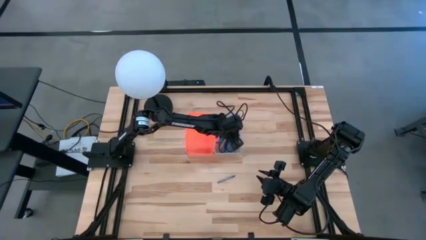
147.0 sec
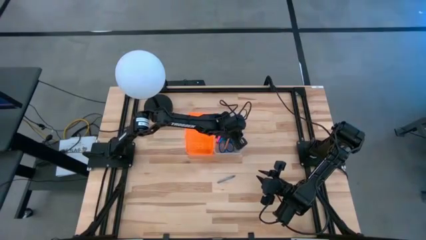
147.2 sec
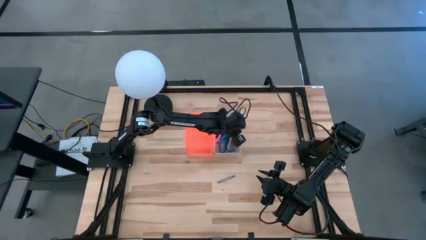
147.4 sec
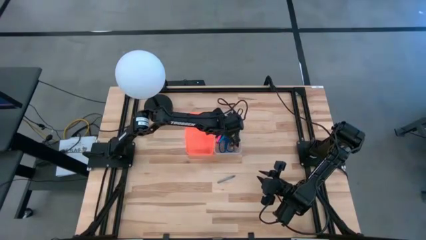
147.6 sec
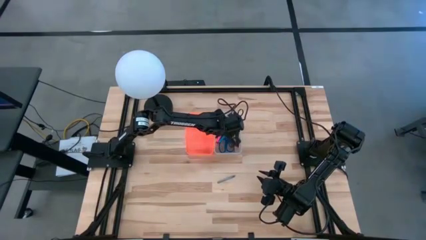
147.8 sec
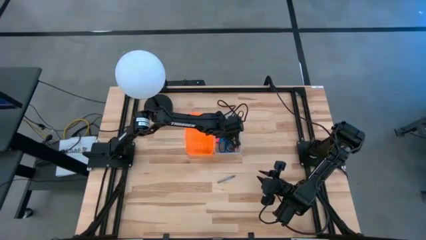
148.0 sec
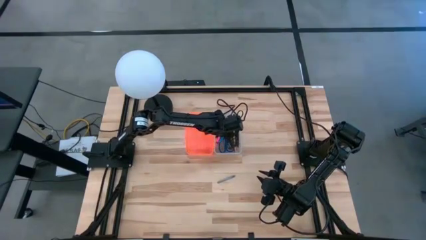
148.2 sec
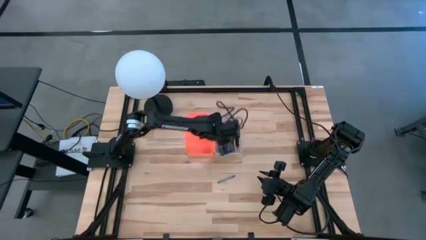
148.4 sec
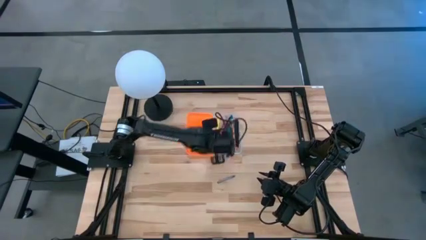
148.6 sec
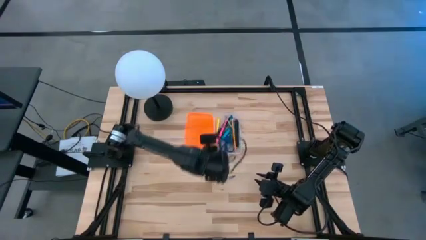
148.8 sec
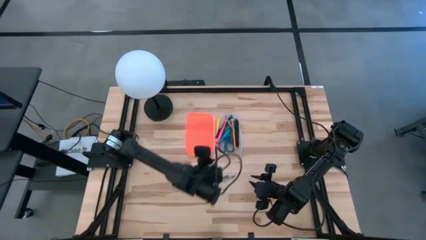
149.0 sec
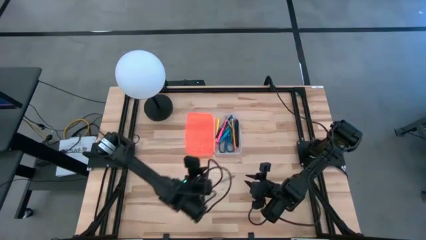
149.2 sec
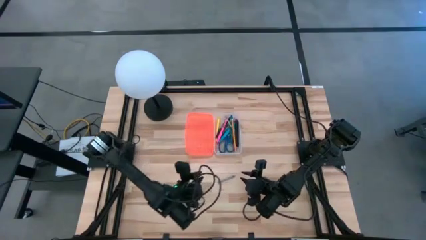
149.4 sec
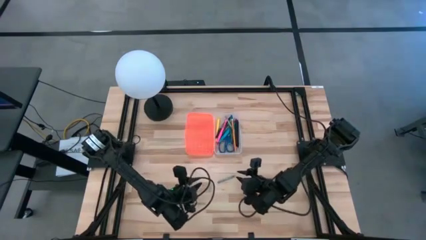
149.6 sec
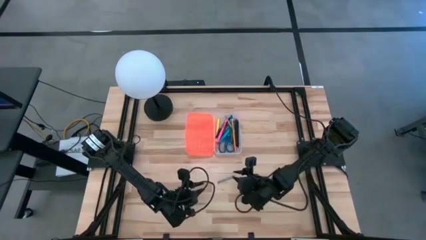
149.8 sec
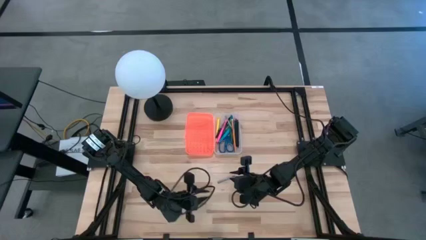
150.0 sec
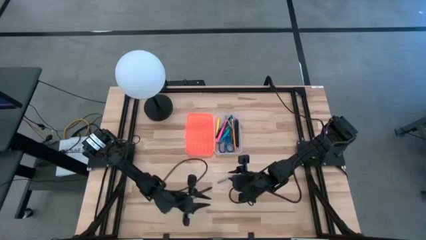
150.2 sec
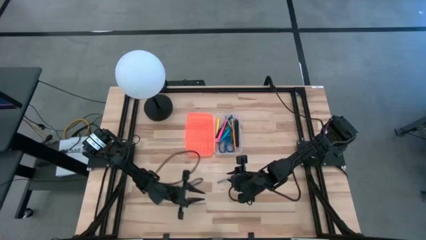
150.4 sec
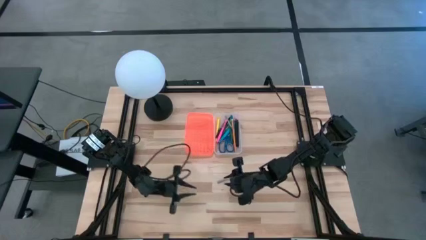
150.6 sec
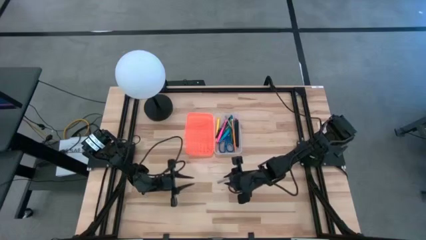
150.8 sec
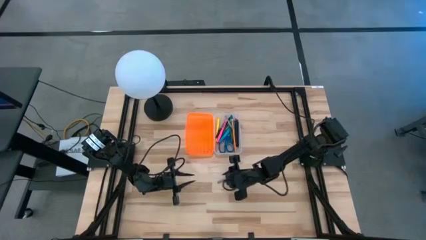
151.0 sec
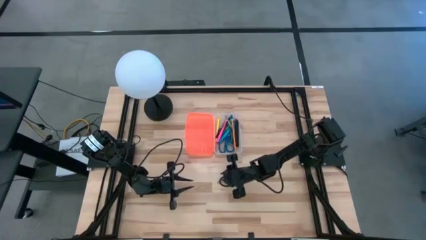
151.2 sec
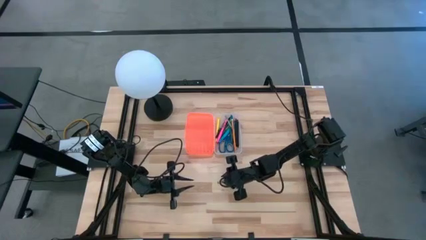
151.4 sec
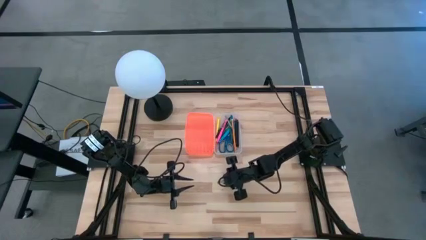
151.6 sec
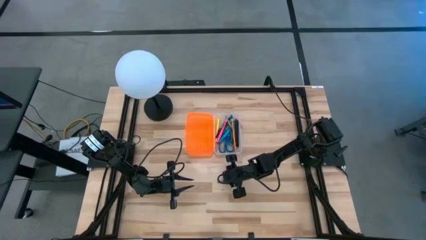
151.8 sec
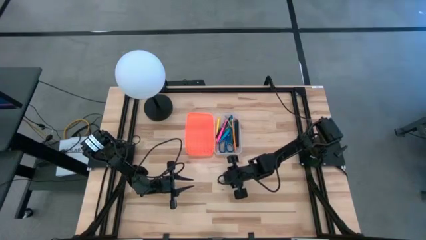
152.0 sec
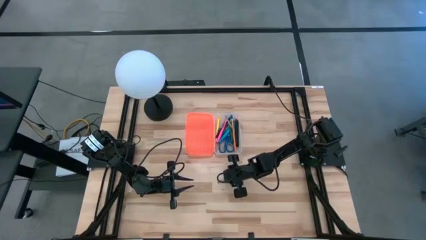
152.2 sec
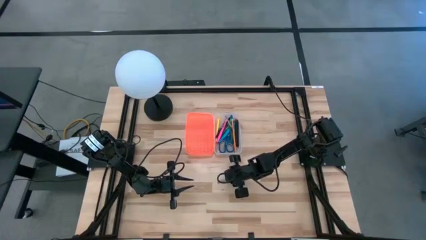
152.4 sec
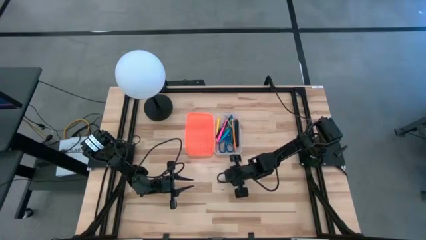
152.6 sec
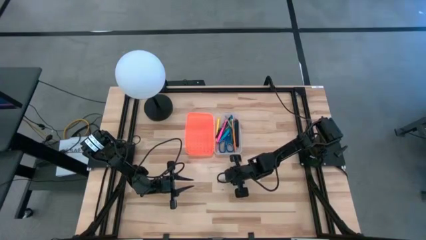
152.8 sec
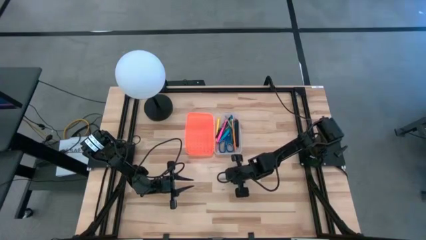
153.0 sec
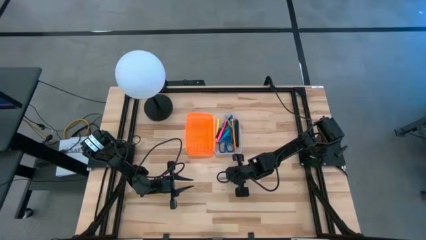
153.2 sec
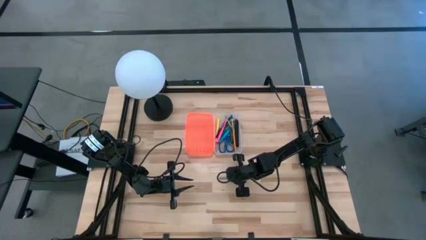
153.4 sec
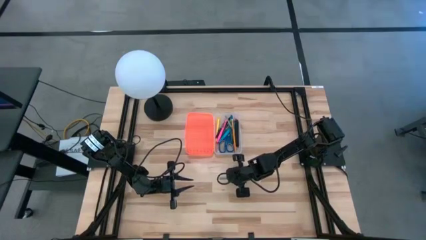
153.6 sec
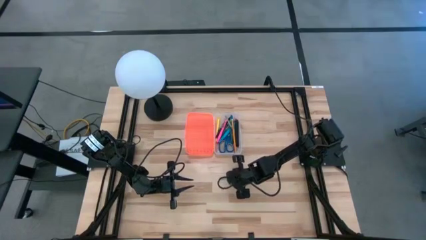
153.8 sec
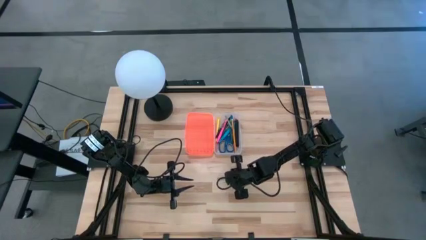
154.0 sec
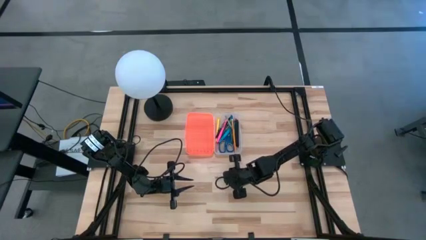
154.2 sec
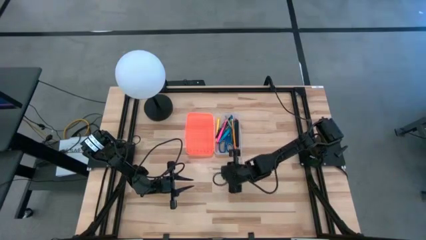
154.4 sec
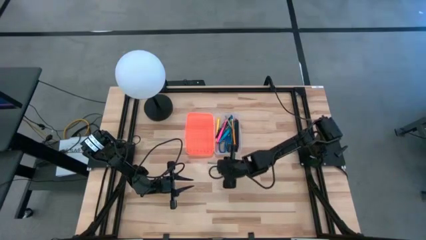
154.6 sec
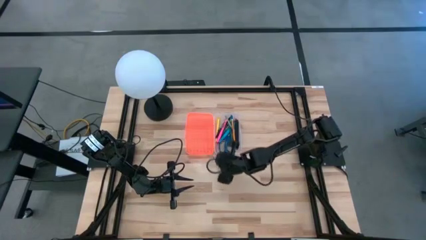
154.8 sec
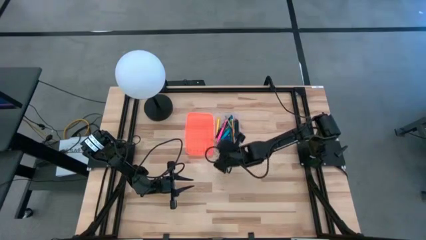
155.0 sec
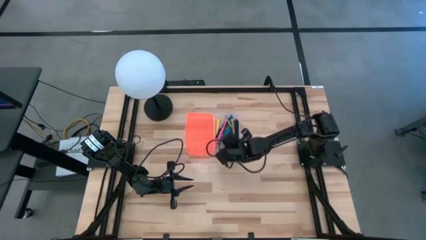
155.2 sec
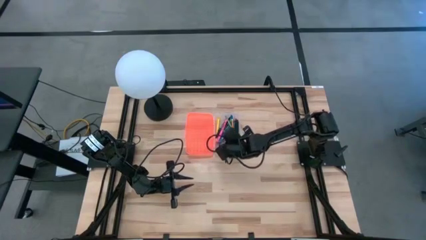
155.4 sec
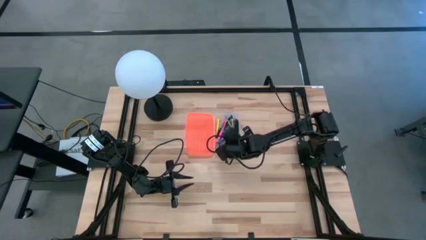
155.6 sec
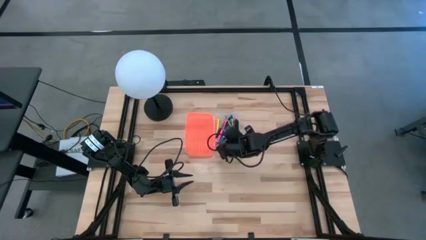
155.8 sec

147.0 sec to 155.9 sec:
Task: Pick & place school supplies into a supply box
Put the gray crayon into the orange supply box

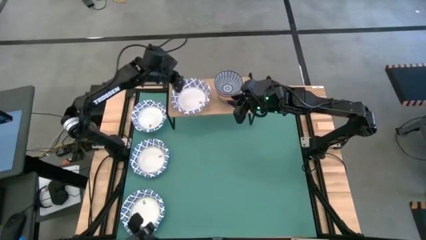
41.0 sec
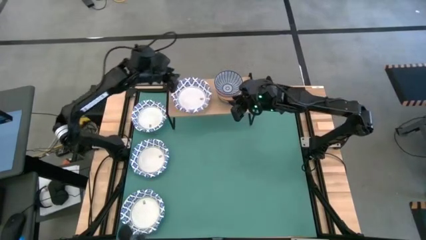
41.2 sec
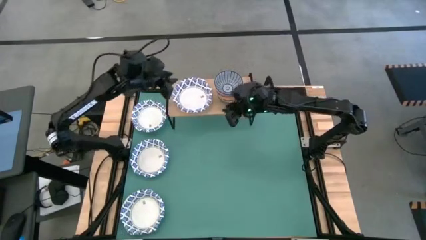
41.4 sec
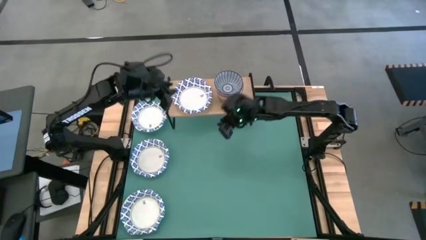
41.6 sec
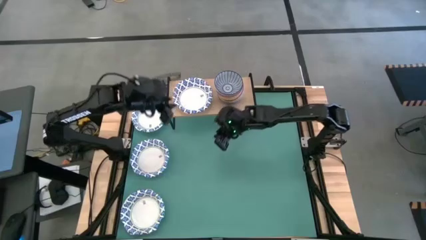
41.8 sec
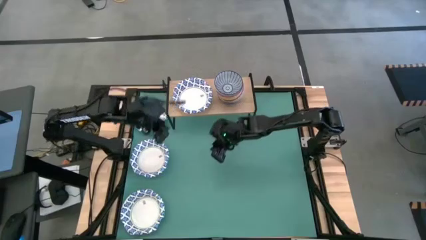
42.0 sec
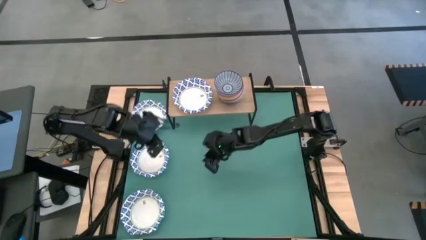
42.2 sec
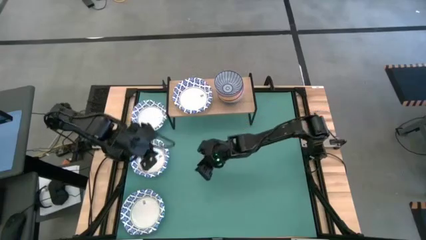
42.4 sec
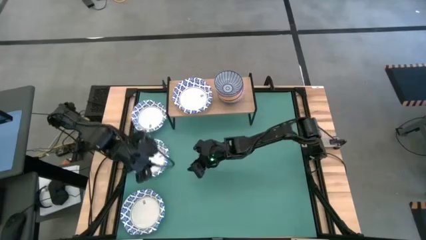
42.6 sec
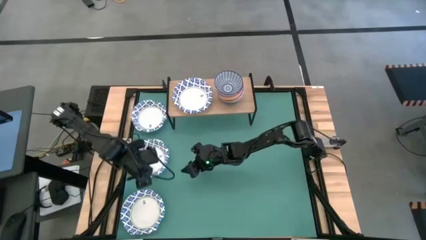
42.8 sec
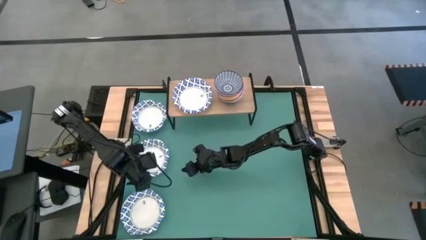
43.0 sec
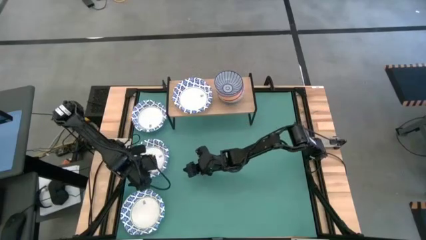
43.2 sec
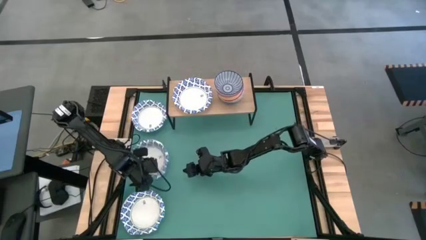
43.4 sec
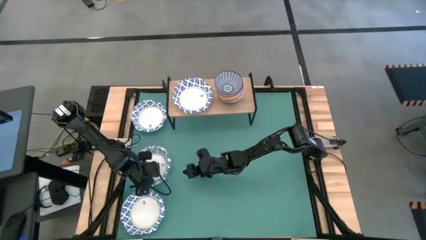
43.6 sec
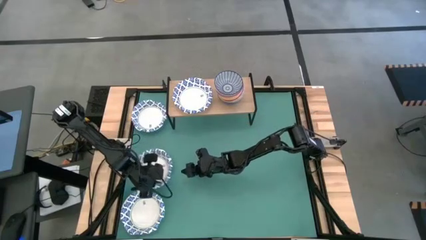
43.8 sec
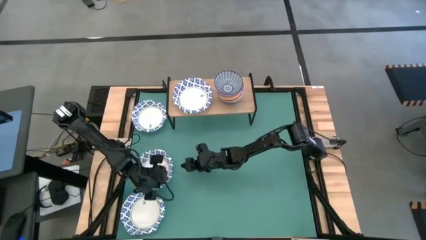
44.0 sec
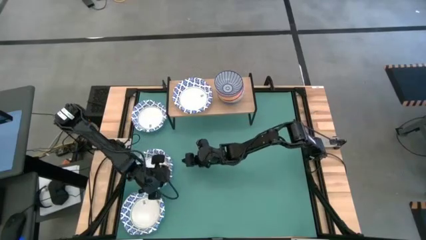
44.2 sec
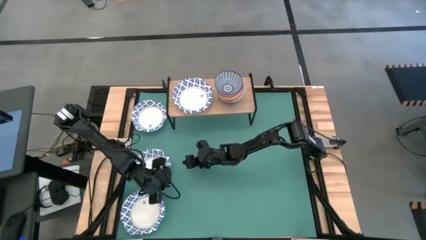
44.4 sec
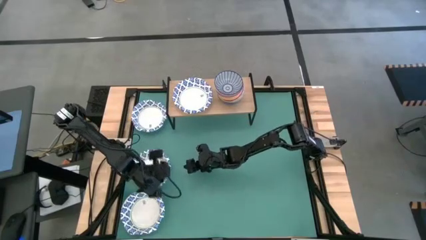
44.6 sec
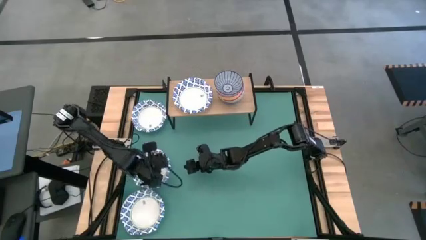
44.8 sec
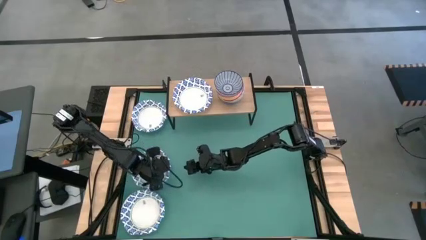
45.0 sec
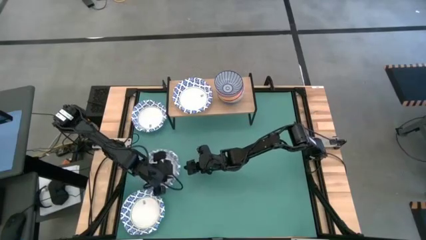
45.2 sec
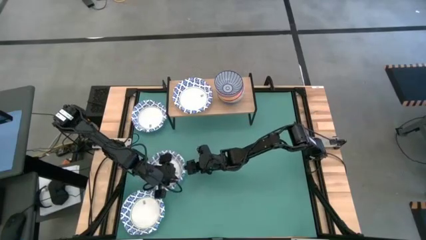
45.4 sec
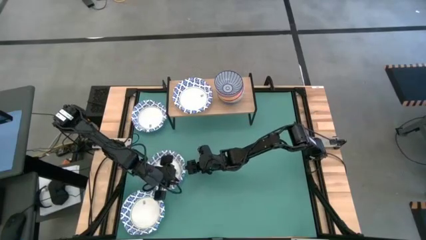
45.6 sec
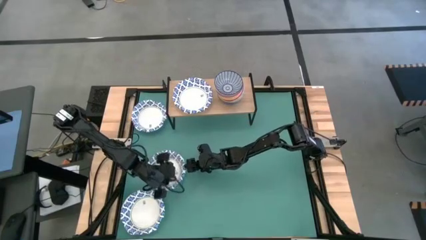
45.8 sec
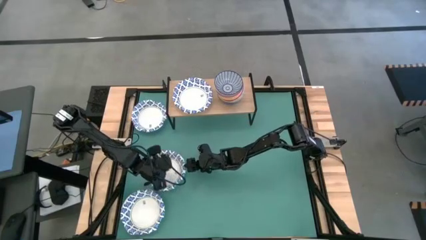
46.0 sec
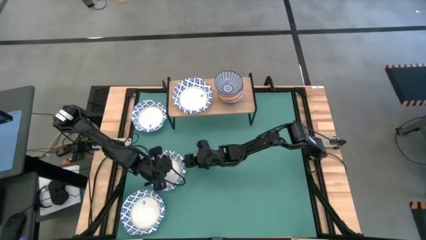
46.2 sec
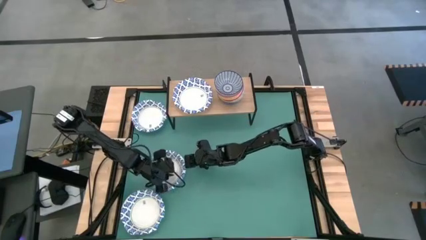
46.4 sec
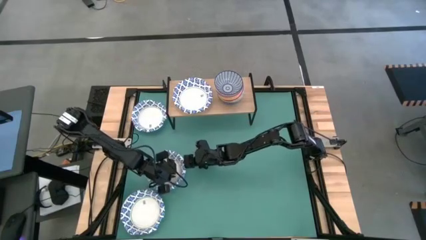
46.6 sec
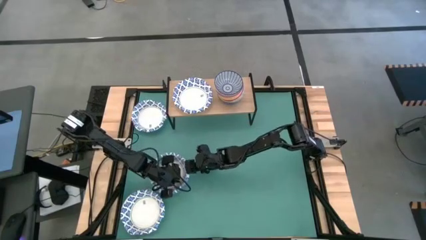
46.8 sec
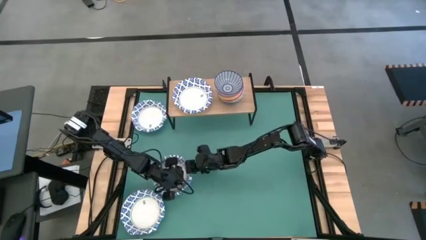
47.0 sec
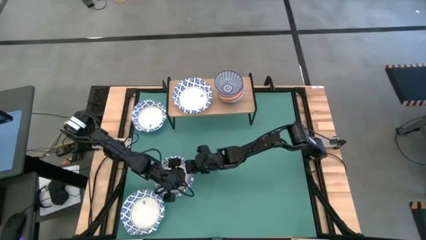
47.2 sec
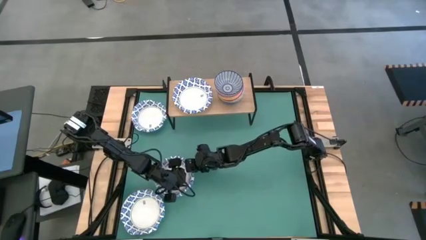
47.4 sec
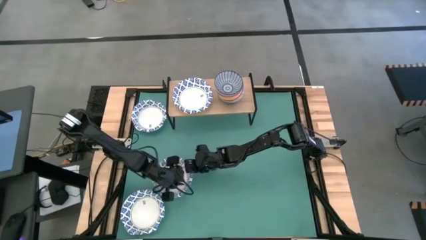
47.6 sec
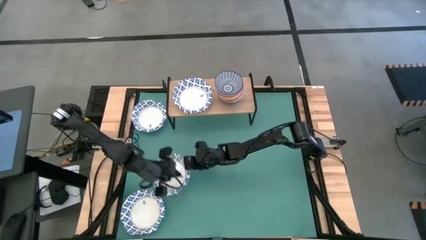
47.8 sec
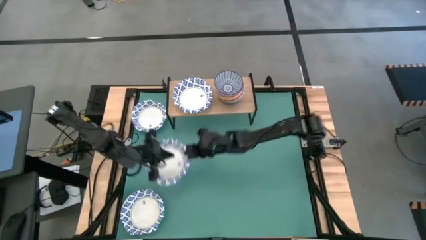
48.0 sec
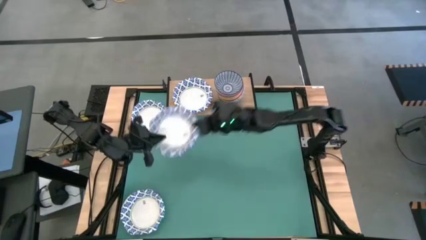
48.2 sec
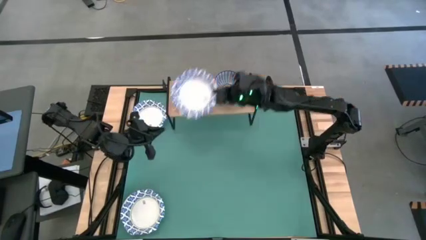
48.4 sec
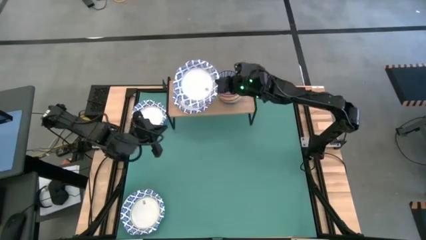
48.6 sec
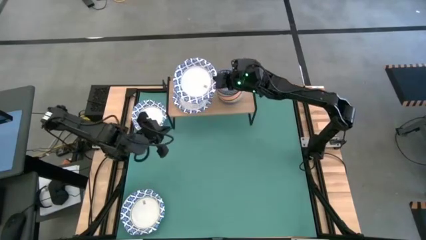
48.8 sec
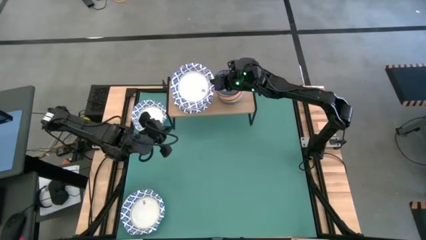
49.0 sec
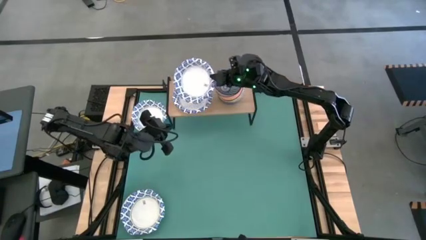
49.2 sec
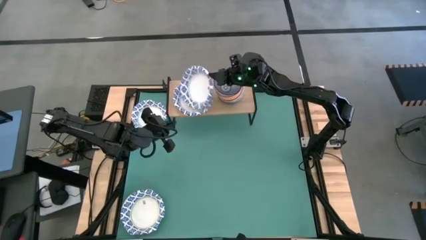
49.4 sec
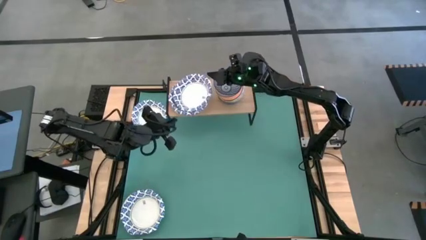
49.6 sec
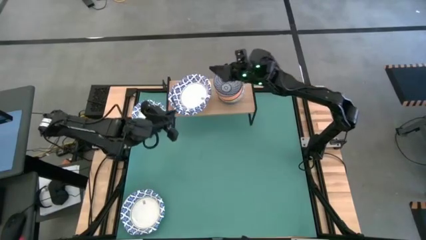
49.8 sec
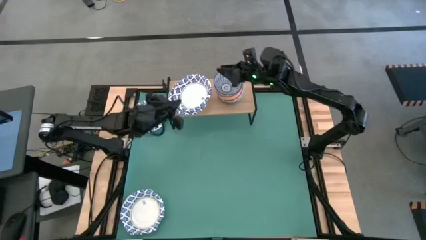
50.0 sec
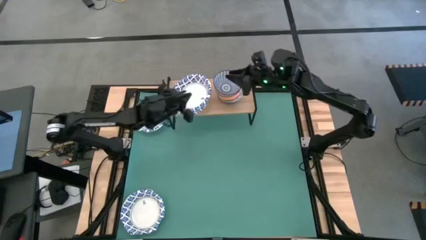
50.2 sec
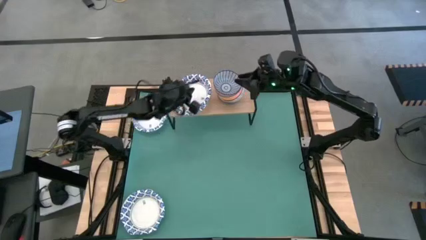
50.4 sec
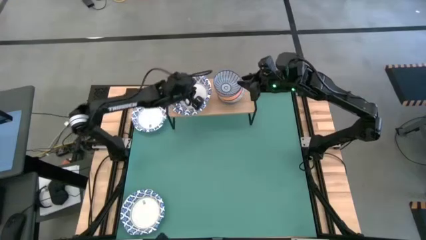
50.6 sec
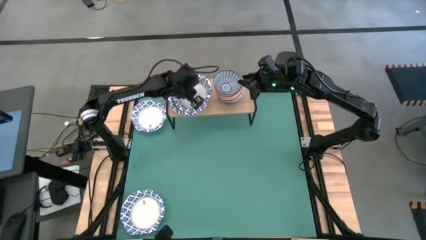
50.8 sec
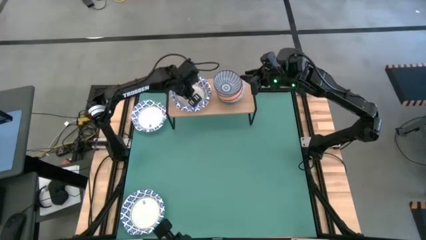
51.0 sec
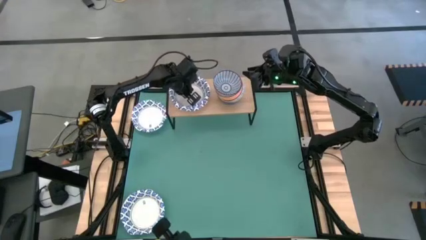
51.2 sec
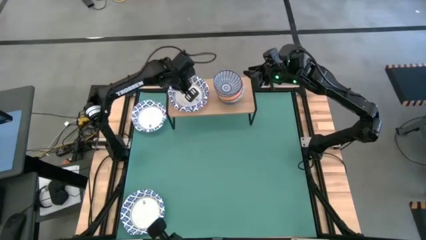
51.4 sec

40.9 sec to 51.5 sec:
Task: Place and stack bowls onto a shelf
Stack the large white bowl on the large white bowl on the shelf
